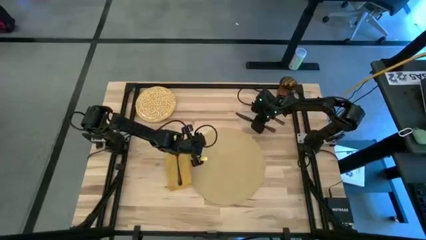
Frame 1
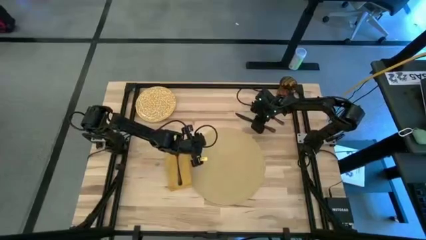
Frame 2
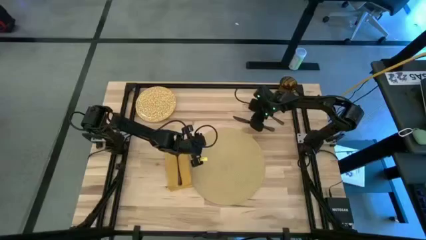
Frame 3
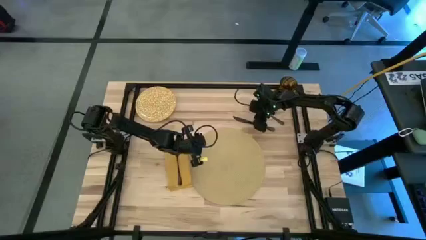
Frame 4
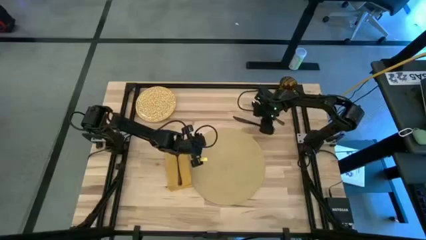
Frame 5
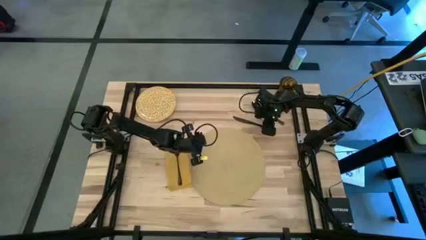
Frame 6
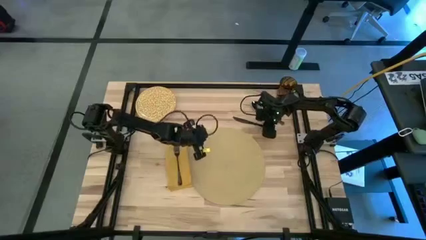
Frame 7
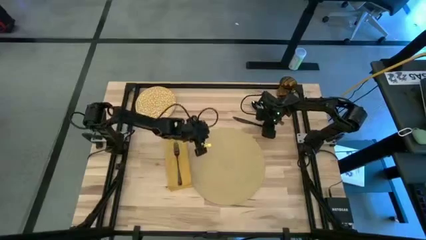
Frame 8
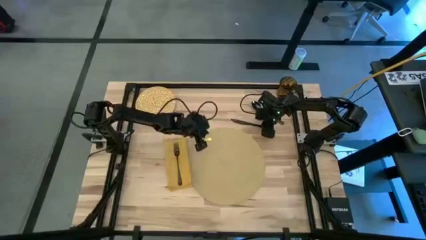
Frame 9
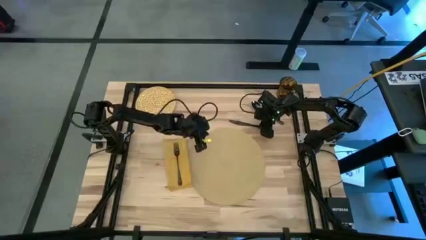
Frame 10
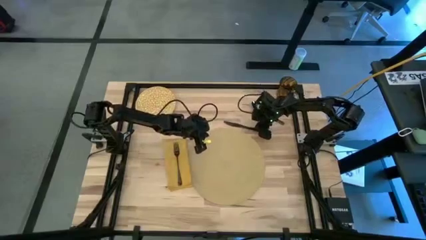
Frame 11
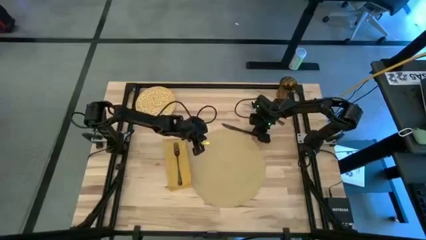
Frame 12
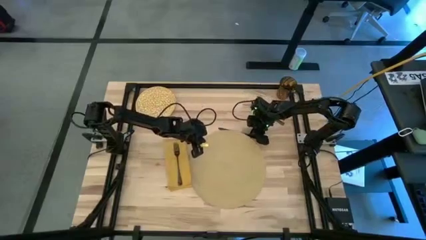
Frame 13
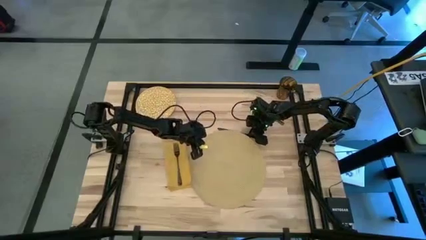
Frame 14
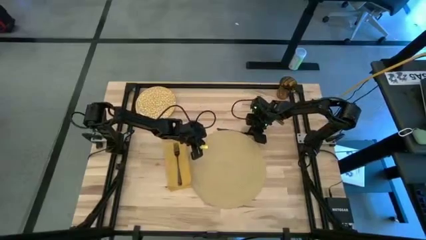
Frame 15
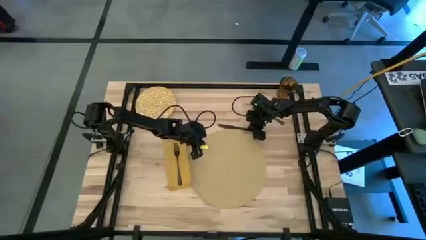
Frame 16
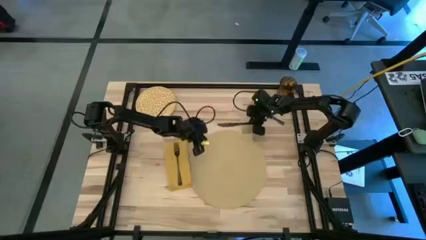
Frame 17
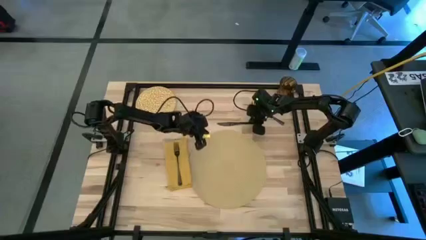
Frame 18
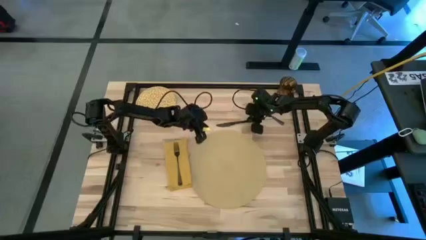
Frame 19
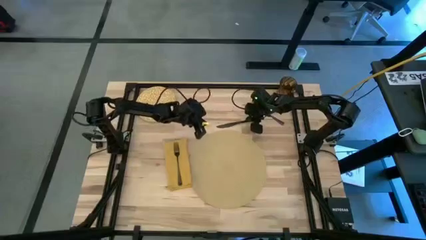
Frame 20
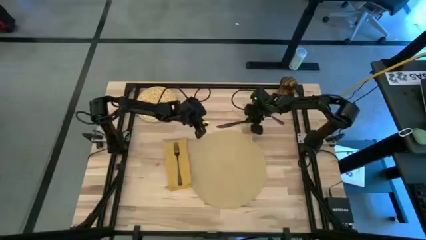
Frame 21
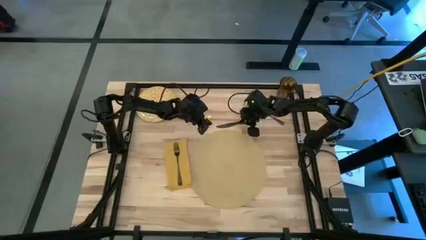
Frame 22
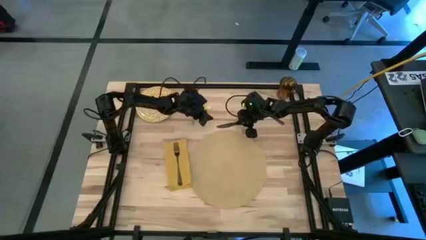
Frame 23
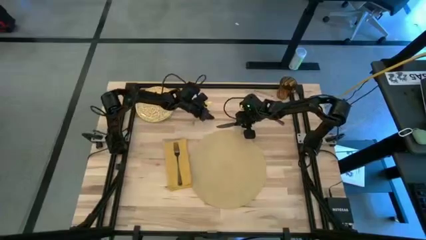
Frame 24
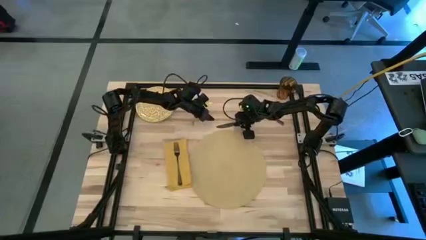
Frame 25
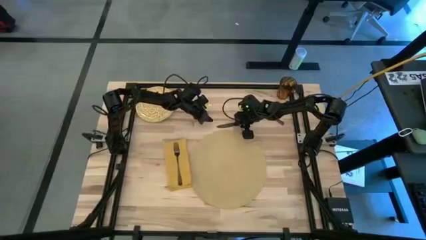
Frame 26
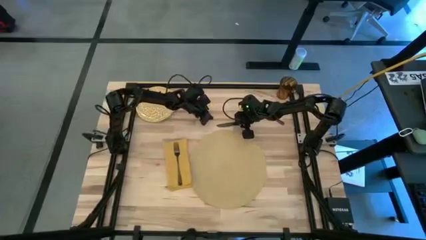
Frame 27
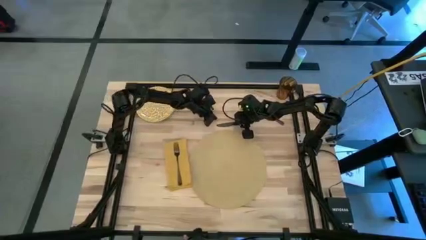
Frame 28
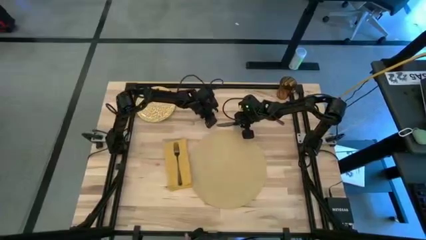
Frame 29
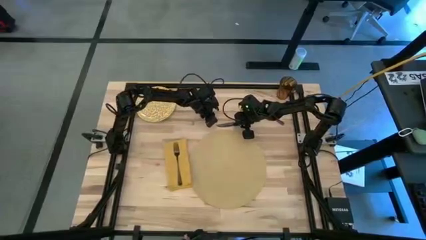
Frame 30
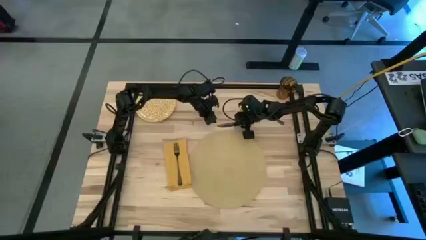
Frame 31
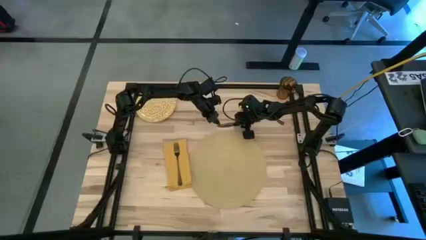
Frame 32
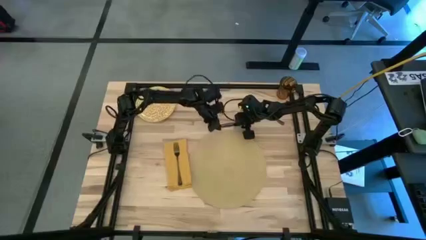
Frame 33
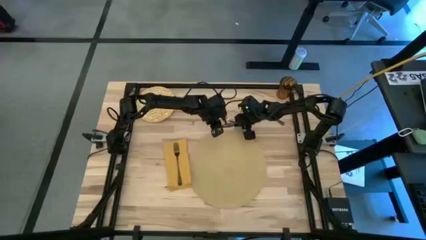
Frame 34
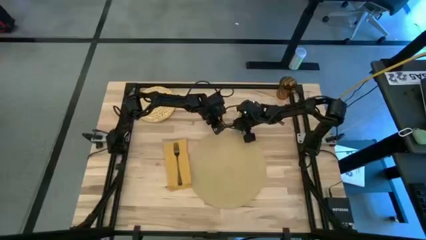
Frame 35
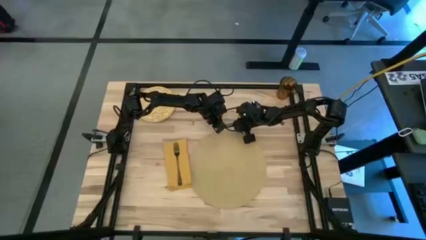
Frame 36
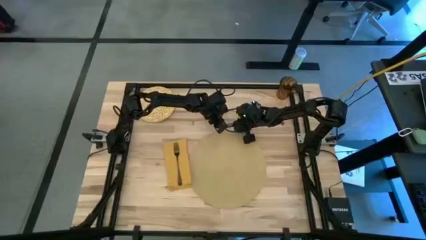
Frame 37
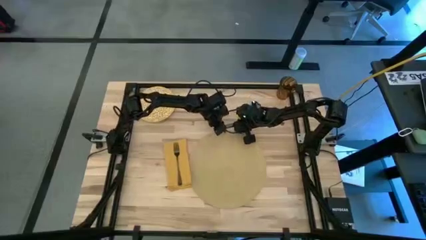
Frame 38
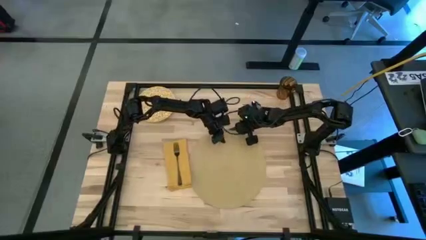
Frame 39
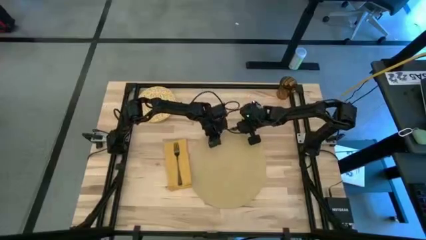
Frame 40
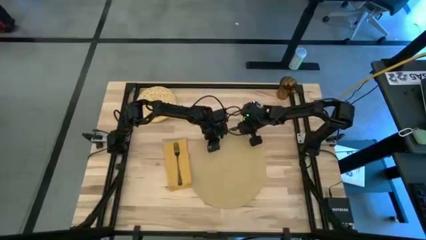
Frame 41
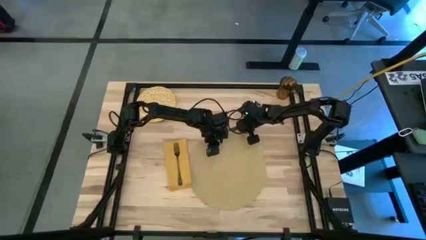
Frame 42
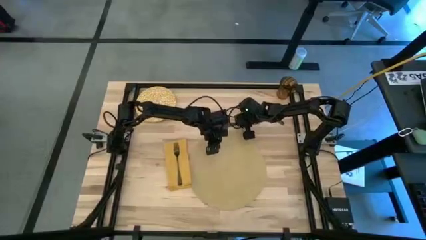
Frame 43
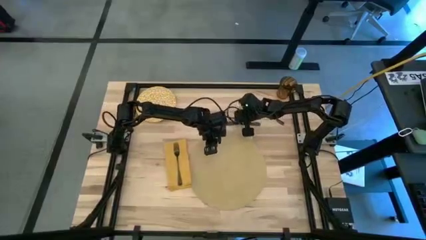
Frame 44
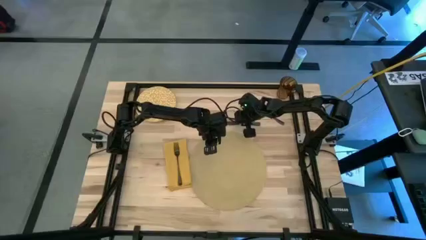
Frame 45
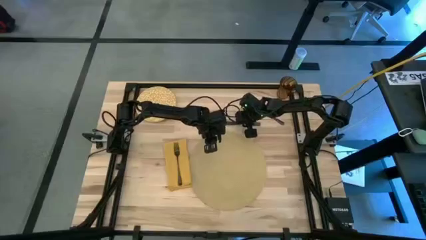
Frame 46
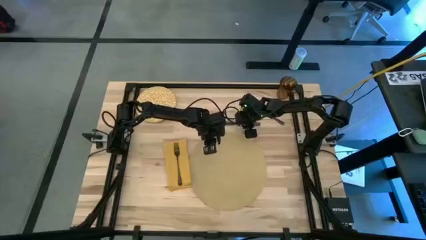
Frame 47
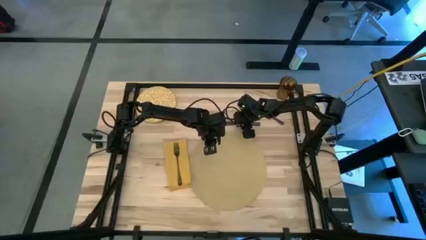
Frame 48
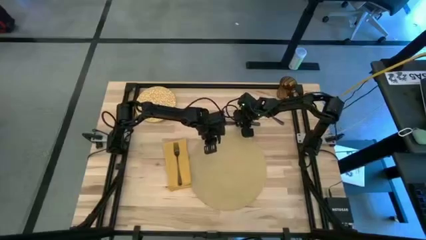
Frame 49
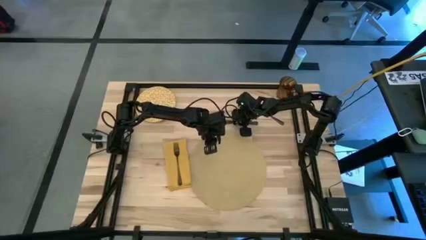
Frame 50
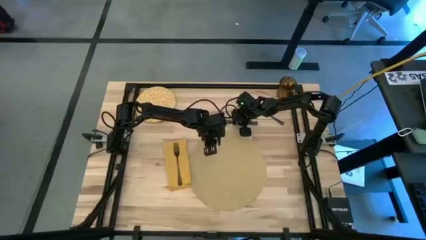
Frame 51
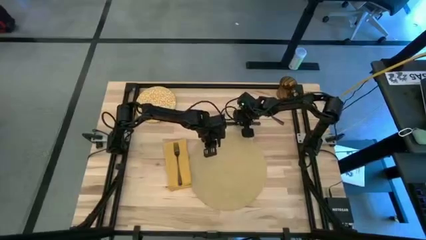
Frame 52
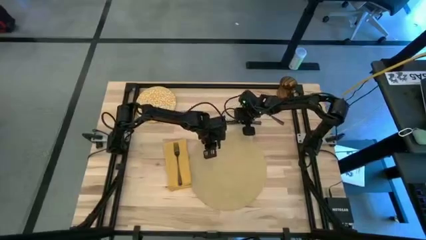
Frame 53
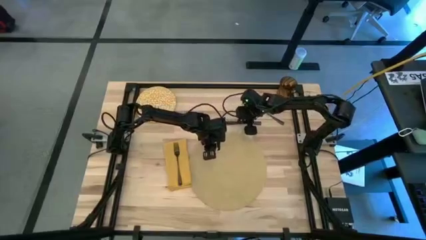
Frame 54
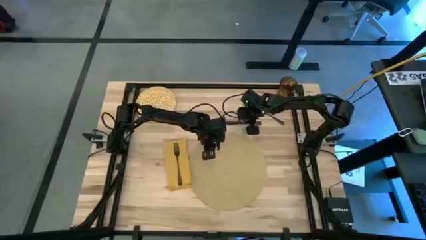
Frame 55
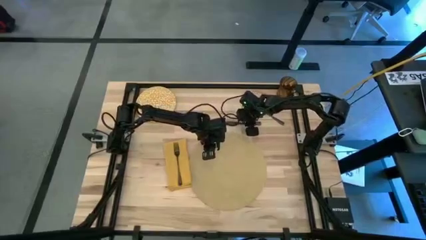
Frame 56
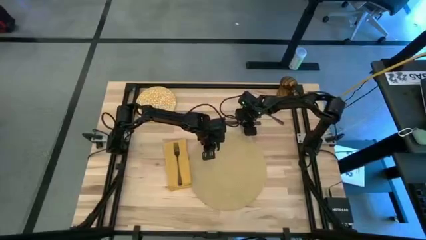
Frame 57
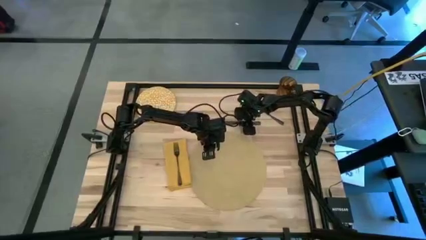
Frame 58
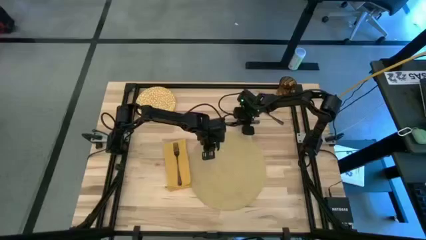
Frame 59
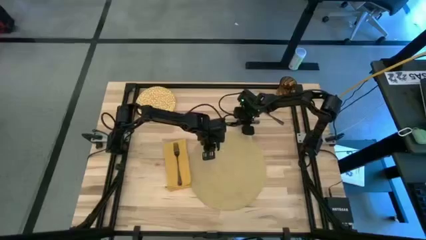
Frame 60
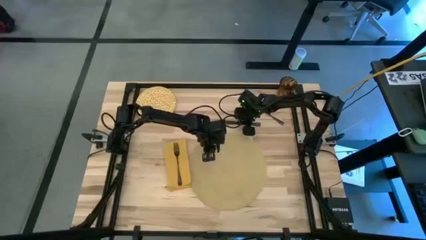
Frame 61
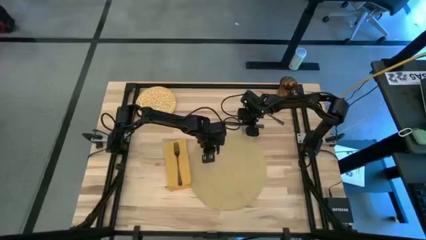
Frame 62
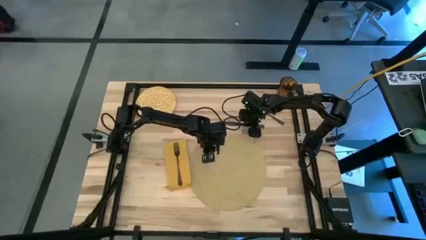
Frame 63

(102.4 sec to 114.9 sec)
Task: Set table place
Put the black table knife on the right of the yellow placemat
